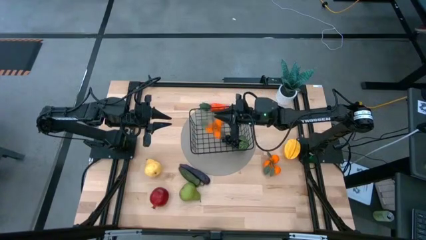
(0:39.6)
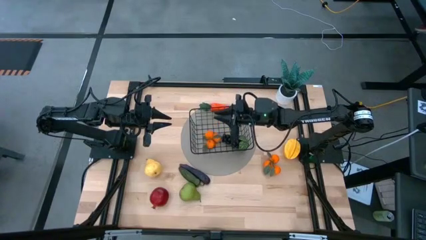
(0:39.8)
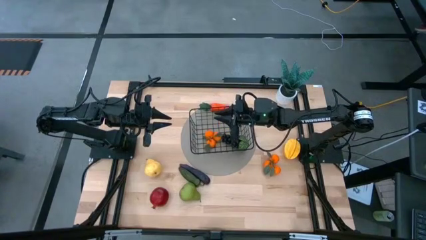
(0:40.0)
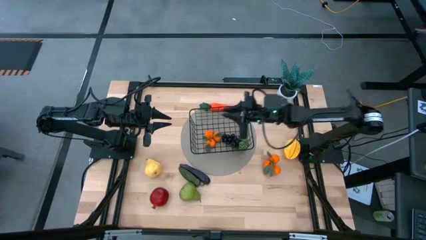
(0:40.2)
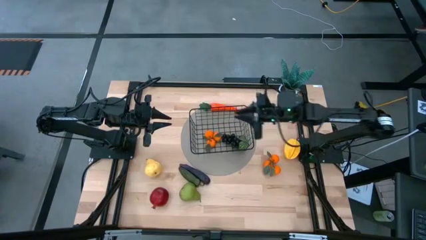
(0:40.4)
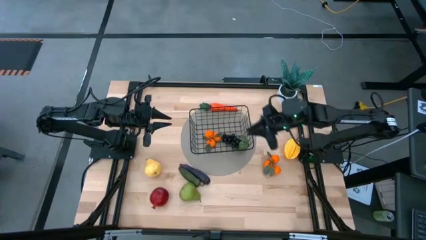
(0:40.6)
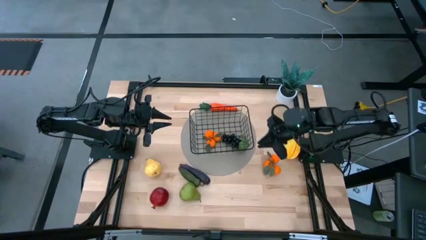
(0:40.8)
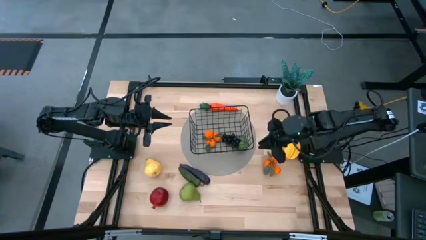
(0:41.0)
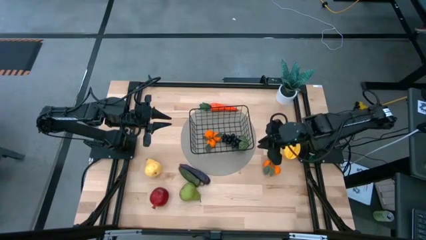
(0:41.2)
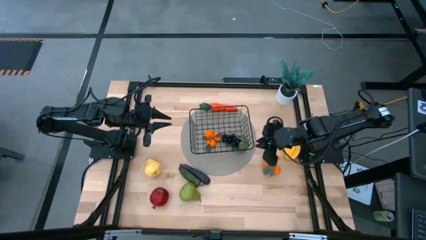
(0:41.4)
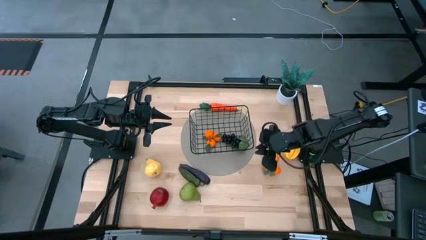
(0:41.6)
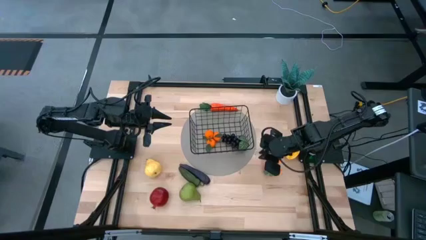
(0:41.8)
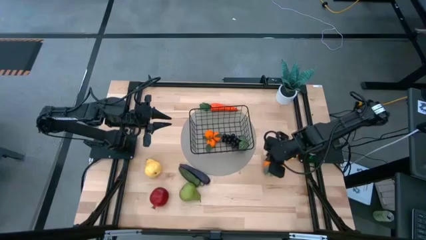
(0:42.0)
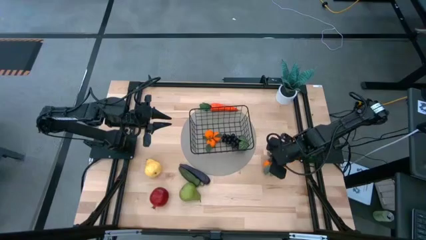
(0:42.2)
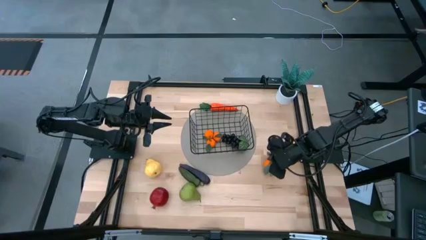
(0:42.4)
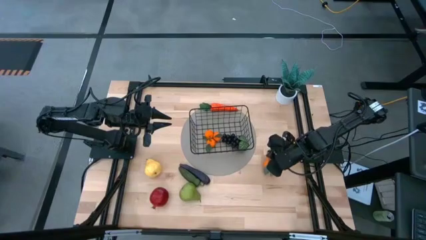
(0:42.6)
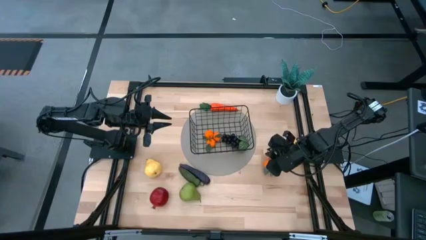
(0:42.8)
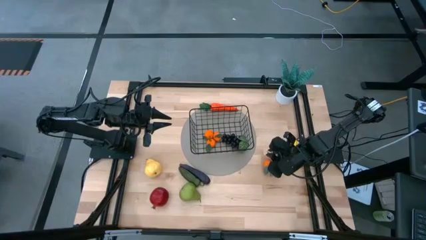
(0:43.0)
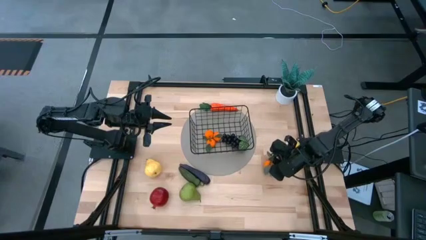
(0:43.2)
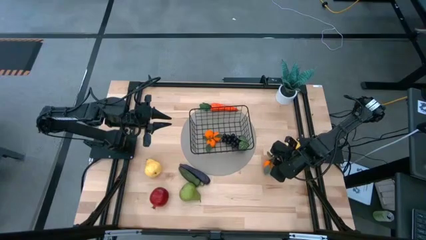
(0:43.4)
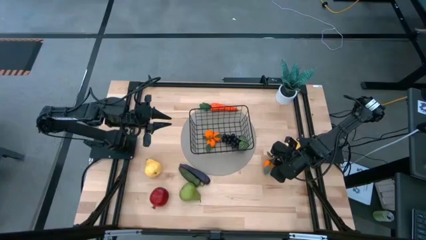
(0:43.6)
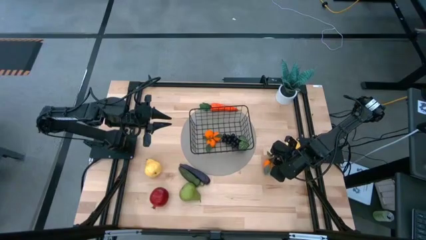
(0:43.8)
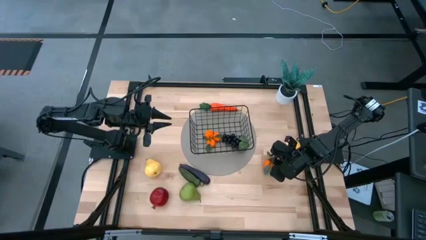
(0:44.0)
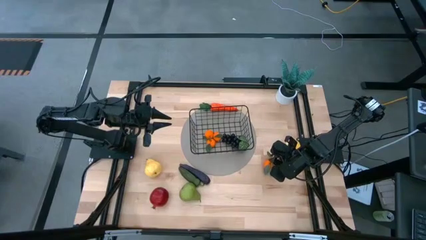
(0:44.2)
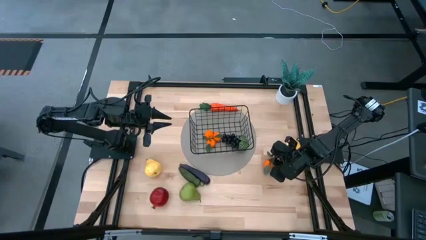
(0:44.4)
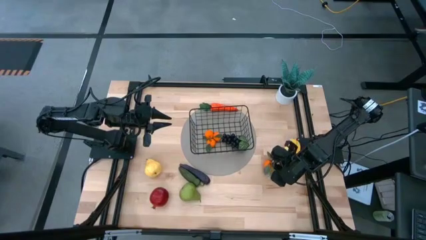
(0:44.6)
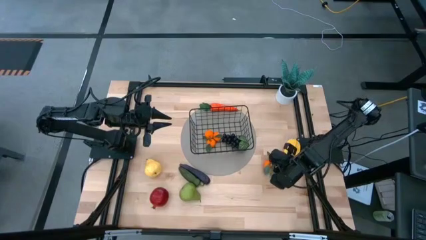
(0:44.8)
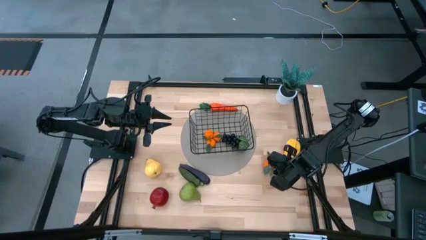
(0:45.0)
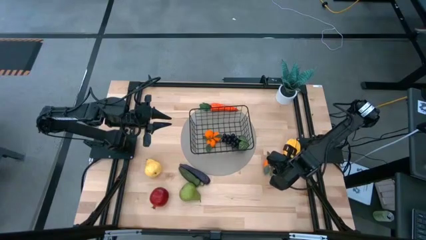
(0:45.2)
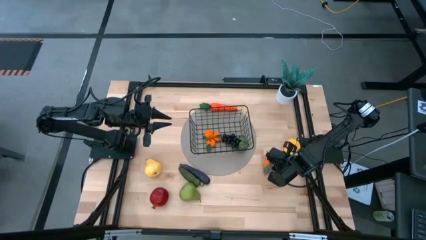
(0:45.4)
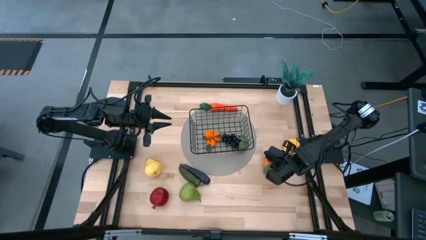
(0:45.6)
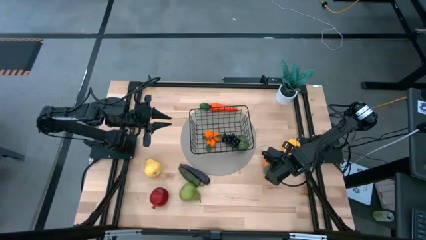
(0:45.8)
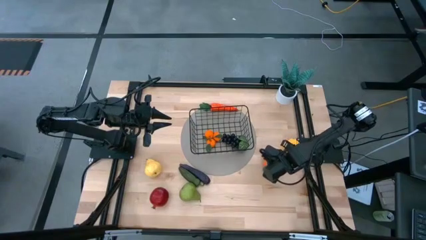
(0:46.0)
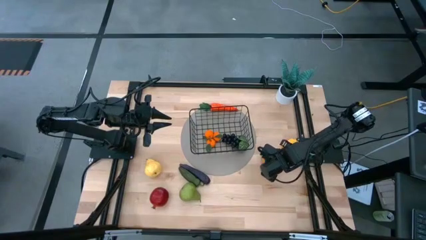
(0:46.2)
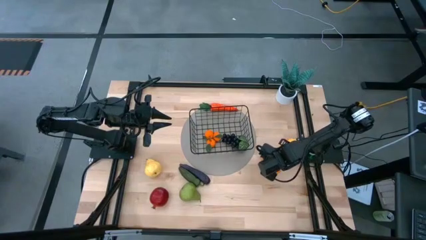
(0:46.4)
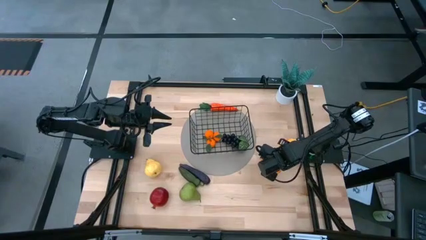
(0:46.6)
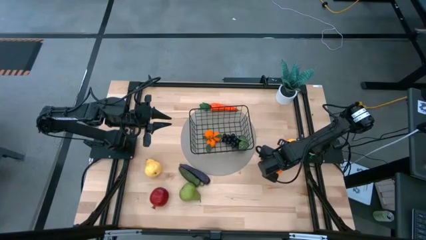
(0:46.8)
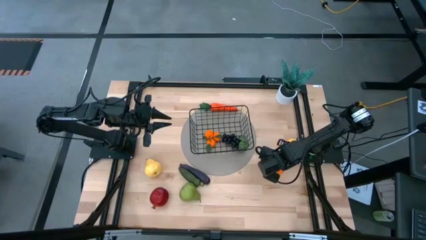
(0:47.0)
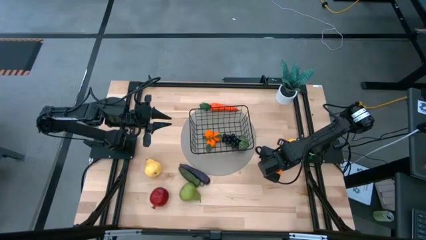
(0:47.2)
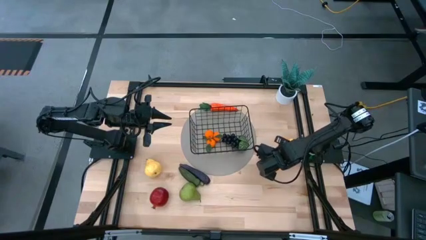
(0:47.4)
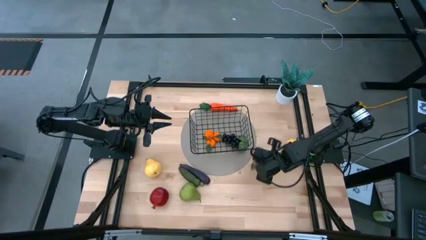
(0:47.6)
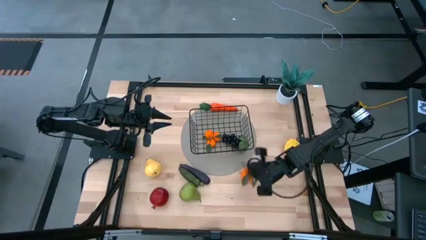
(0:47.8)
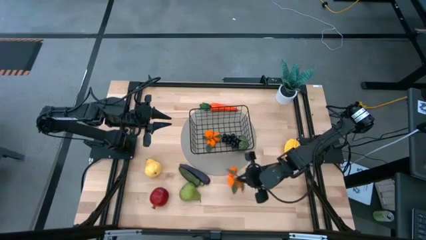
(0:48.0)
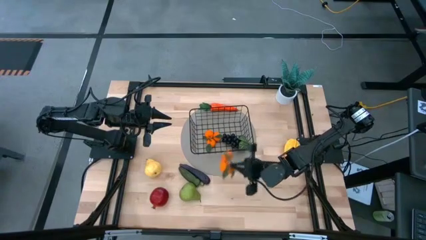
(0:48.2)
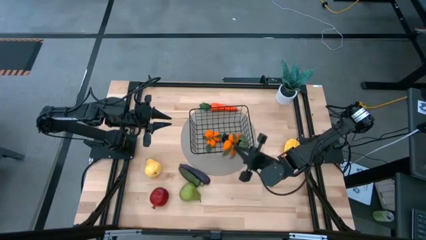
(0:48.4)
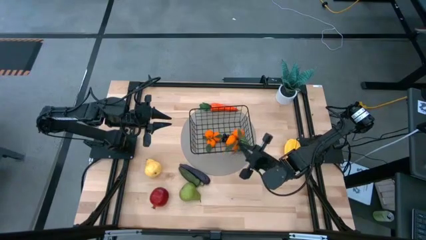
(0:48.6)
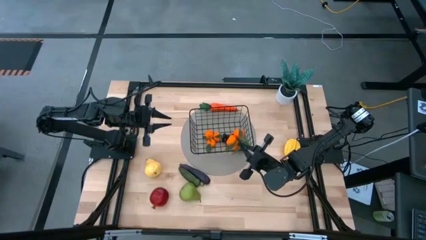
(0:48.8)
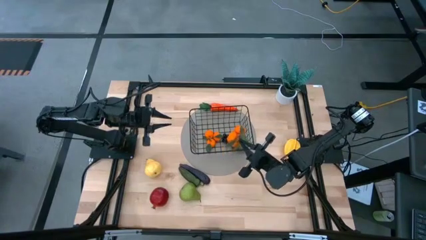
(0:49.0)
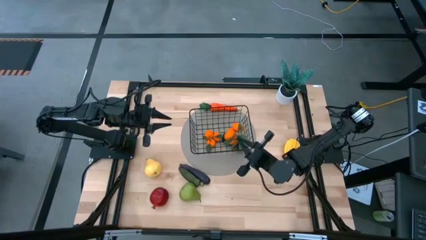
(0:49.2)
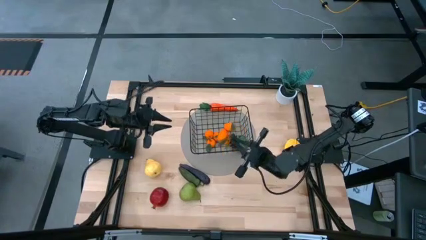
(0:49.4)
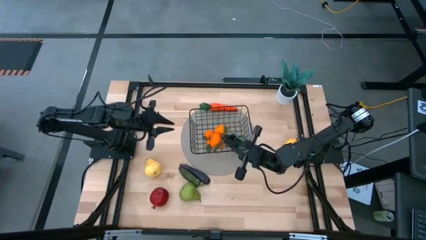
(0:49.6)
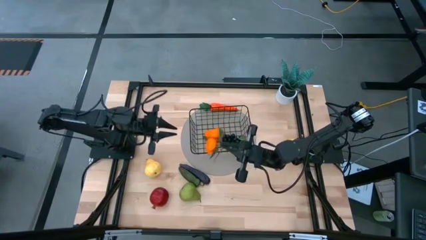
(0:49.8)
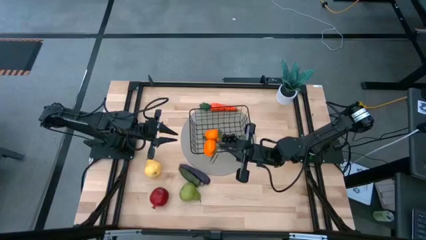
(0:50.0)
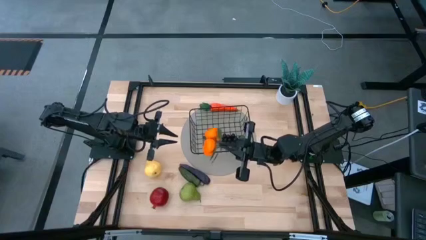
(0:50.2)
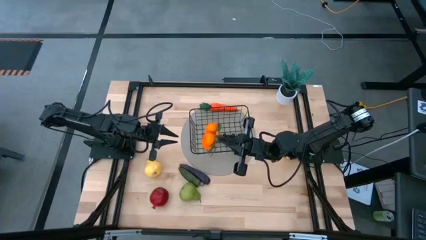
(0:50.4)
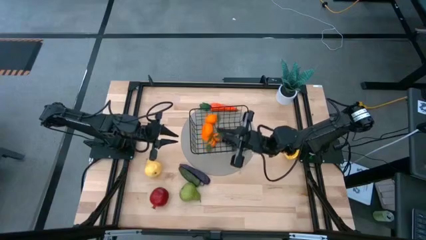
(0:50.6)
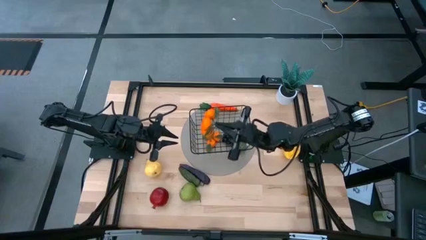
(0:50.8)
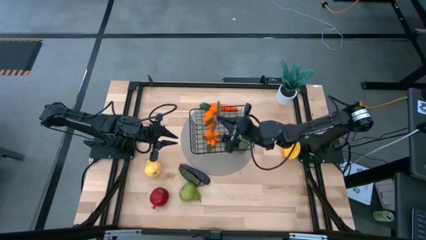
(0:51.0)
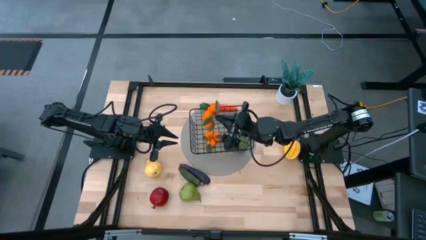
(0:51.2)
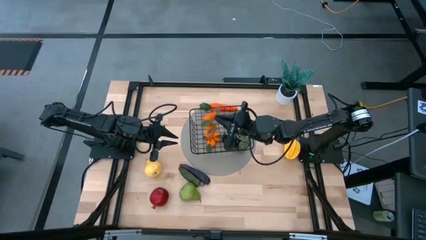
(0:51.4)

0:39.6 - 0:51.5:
Task: Build produce basket
Put the bunch of tangerines in the mesh basket

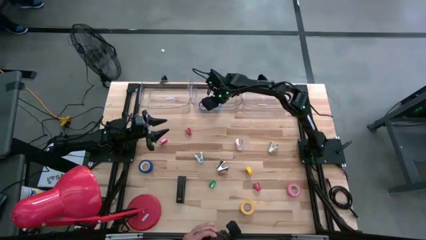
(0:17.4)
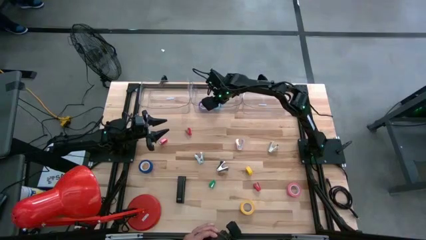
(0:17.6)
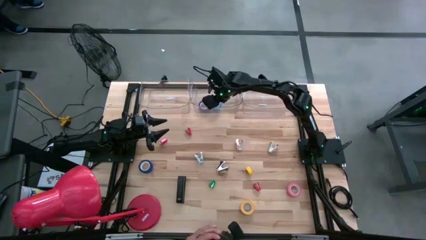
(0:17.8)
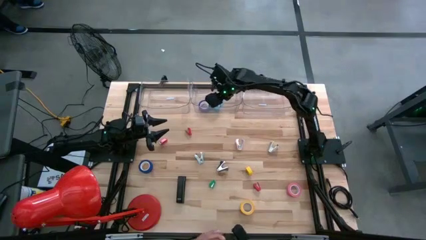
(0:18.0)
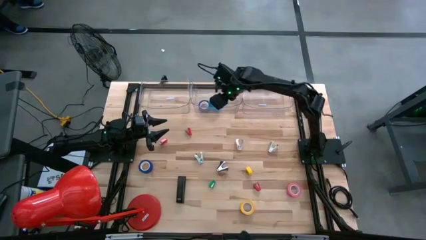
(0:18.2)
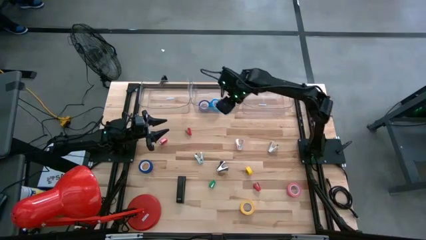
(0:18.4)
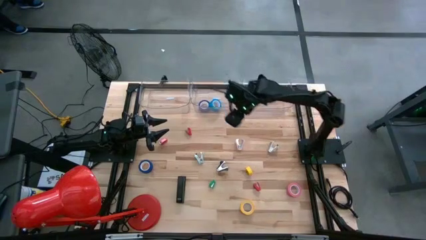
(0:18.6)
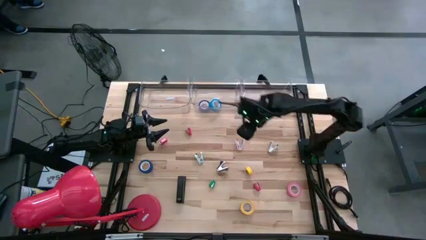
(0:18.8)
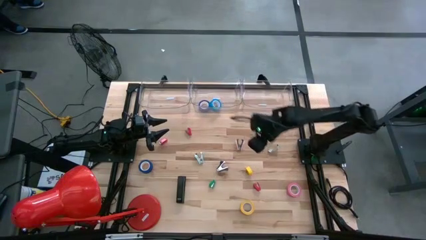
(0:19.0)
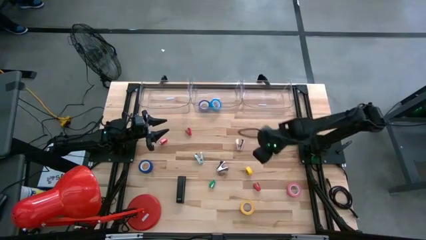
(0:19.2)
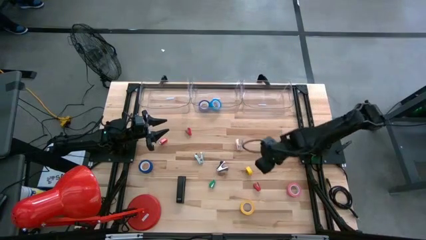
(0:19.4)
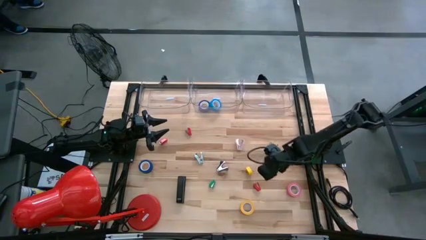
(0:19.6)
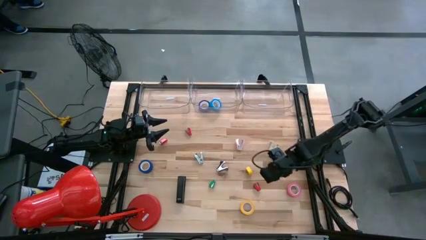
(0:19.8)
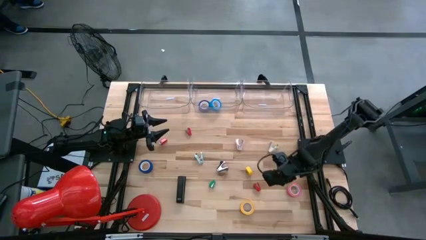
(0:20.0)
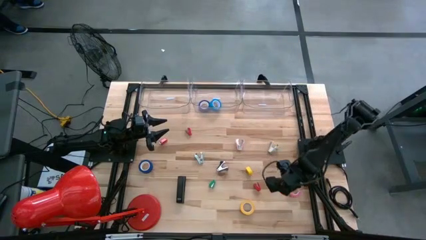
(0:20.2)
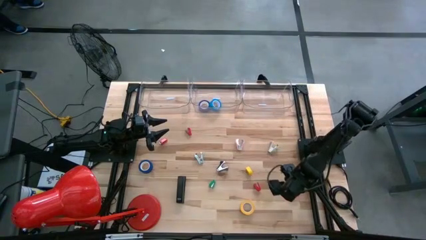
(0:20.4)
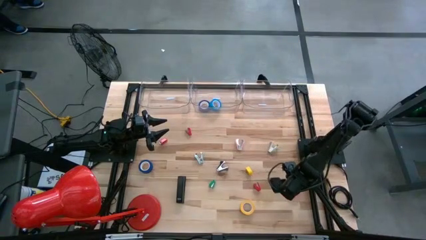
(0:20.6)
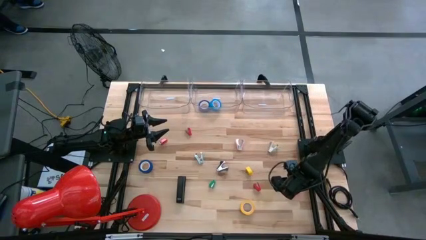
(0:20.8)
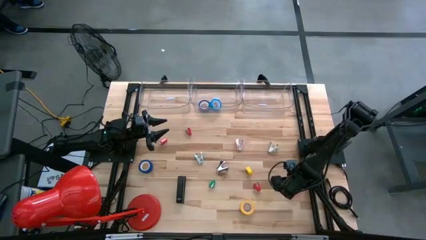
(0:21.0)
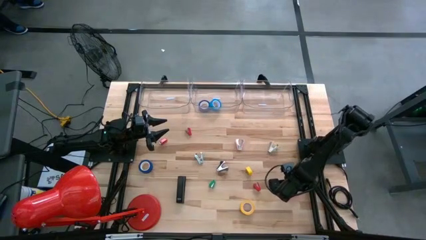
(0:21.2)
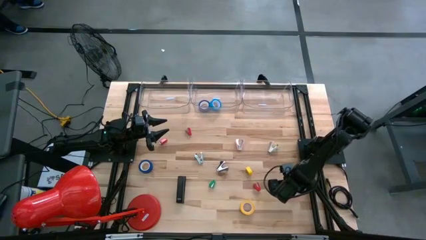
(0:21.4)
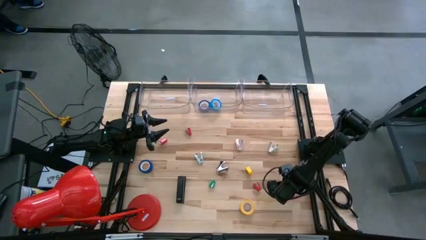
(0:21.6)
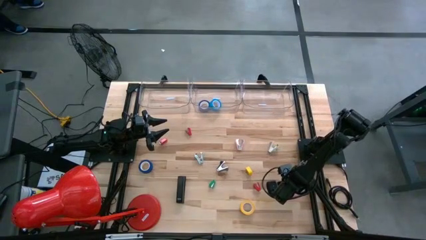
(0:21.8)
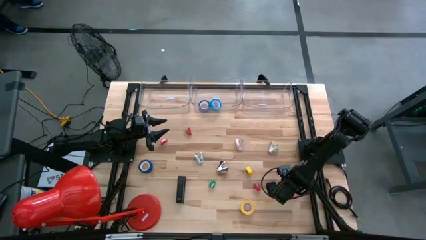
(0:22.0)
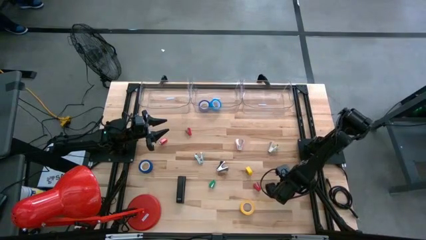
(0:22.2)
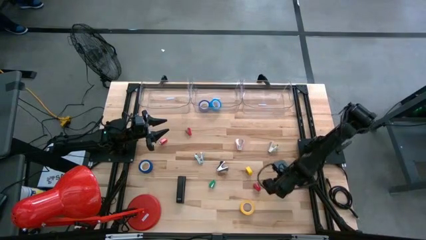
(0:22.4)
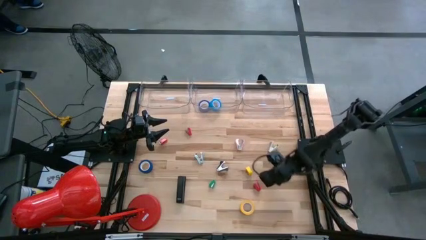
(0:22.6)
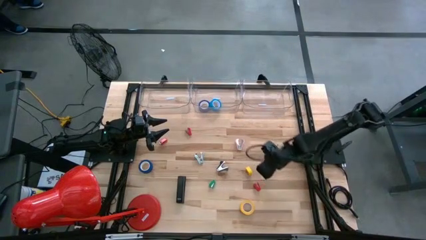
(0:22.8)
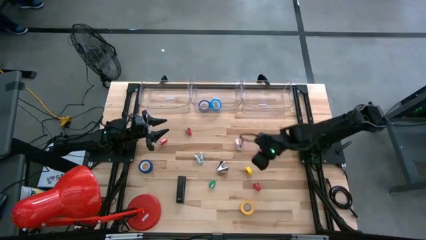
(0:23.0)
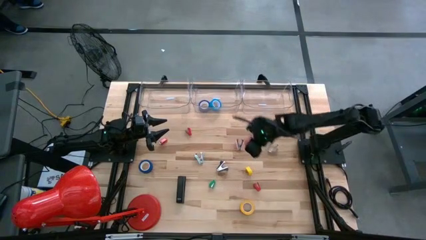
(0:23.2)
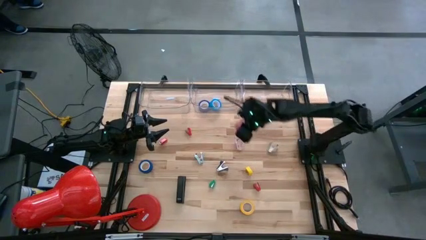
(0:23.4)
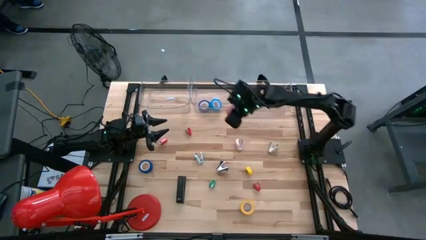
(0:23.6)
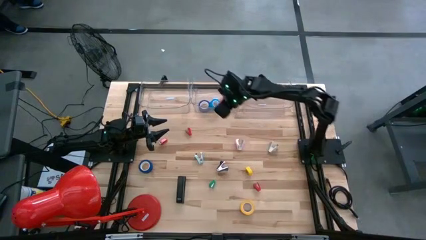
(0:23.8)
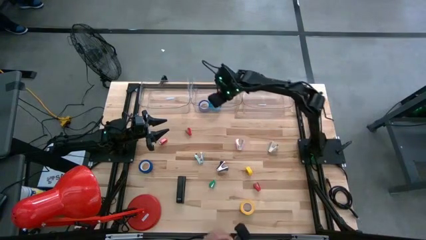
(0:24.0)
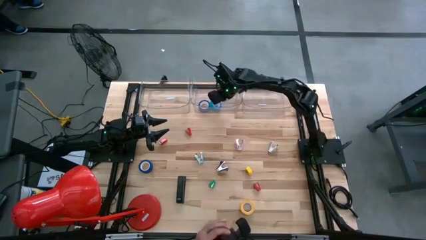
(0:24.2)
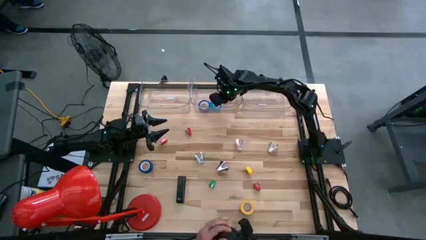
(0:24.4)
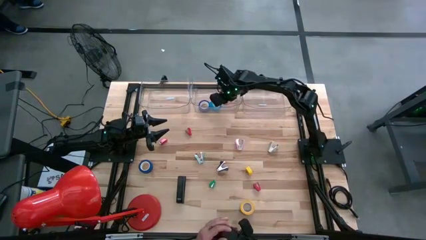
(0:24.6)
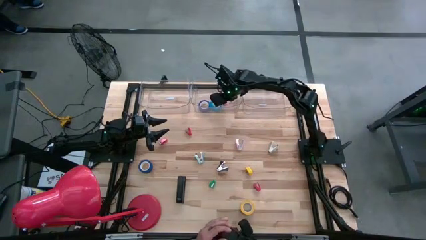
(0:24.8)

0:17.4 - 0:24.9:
Task: Pick and place Stapler, Stapler remover, tape
Put the pink tape into the middle transparent bin
